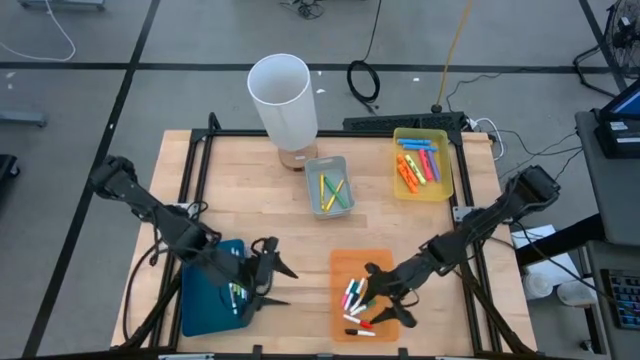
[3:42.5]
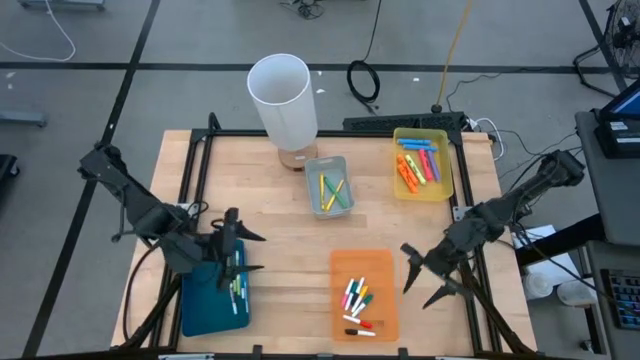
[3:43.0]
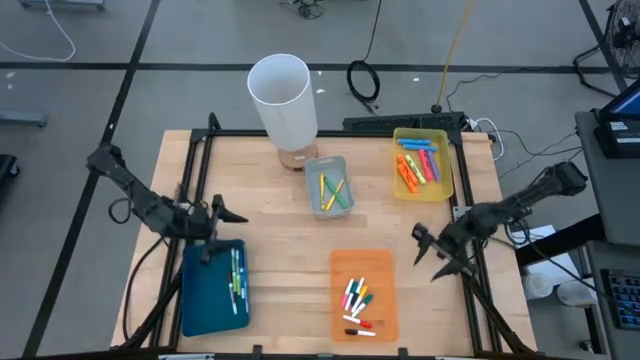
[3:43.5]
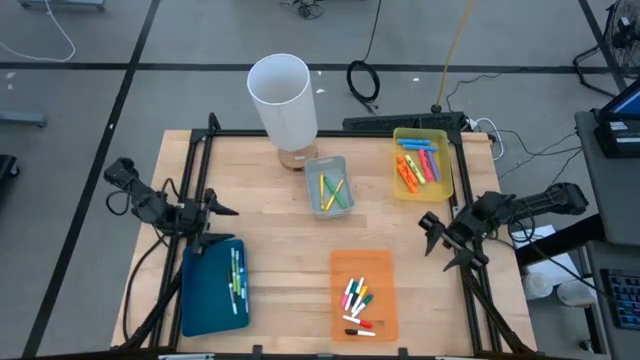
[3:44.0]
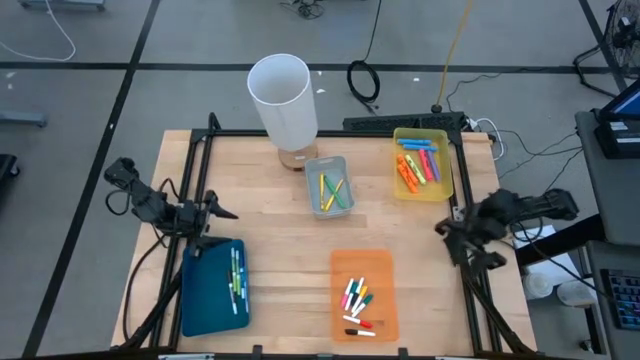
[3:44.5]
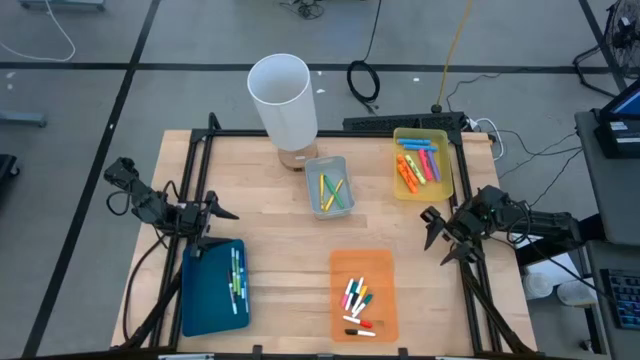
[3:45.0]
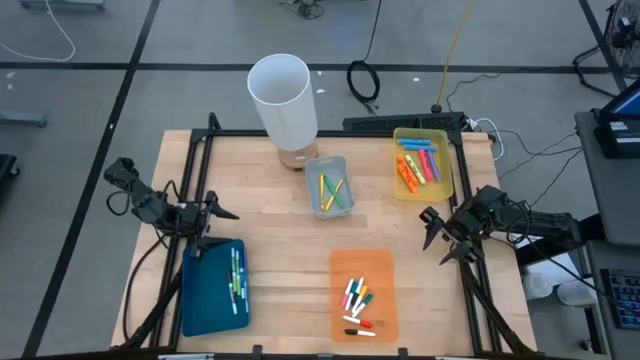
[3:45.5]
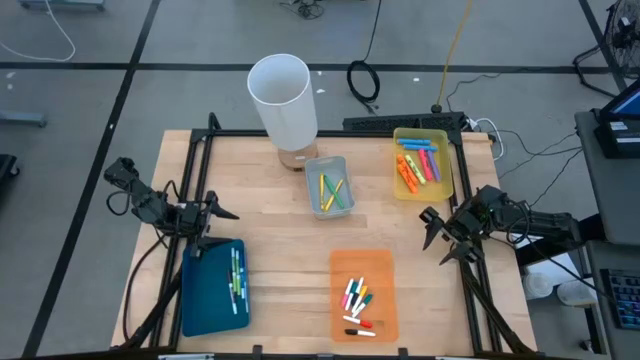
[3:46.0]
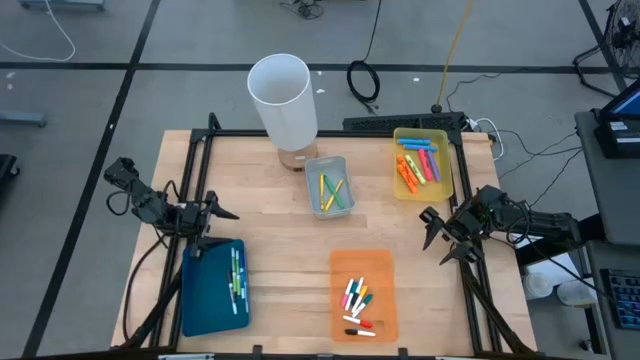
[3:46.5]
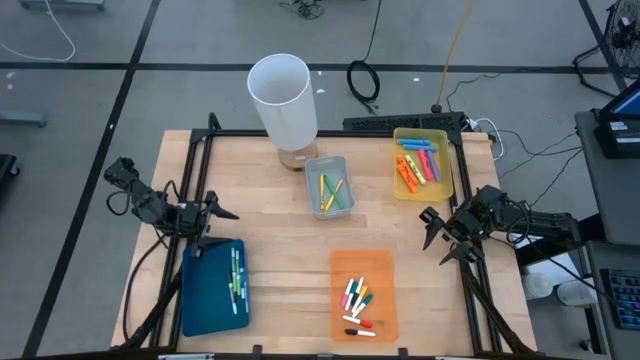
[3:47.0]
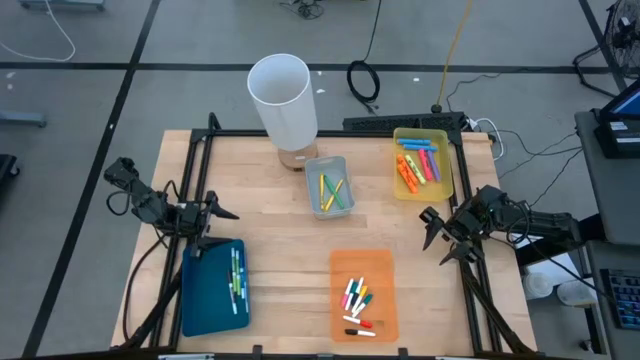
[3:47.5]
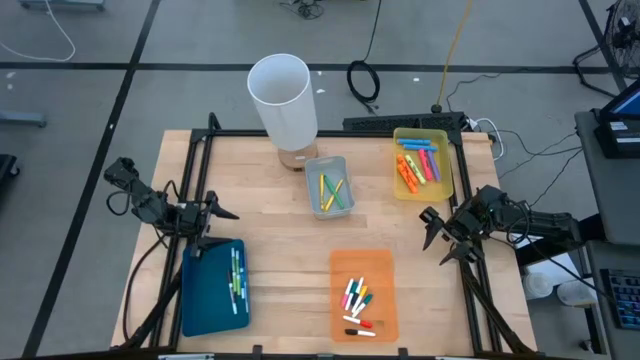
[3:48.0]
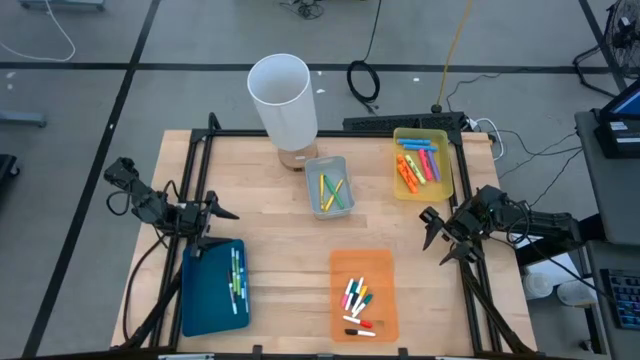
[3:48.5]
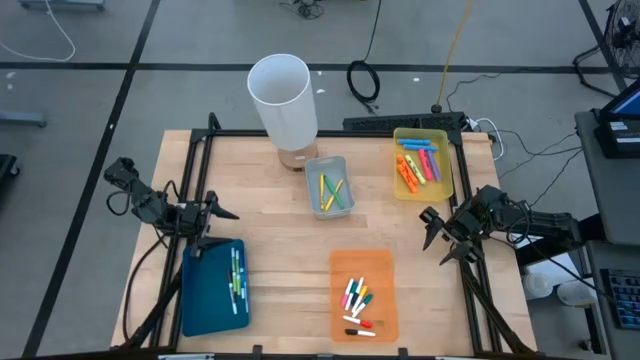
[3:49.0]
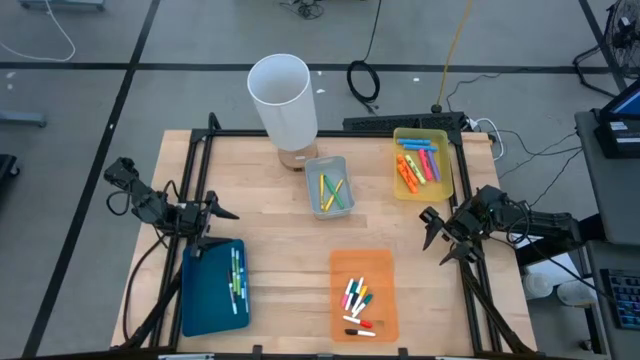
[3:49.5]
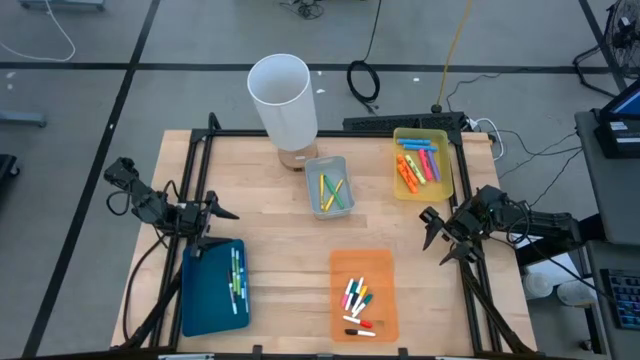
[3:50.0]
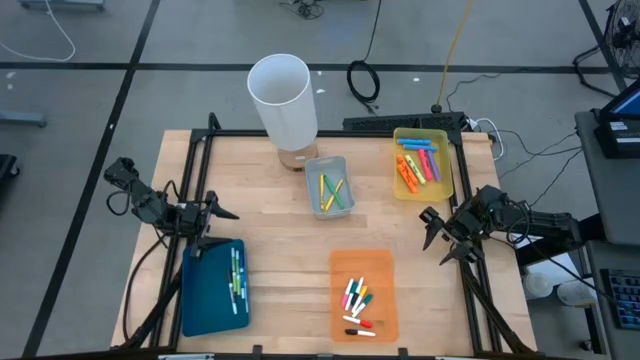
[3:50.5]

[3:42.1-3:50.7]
Task: Pick & Place Markers
Return to Home Position

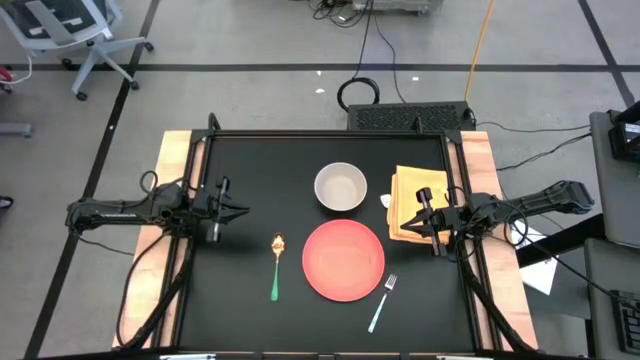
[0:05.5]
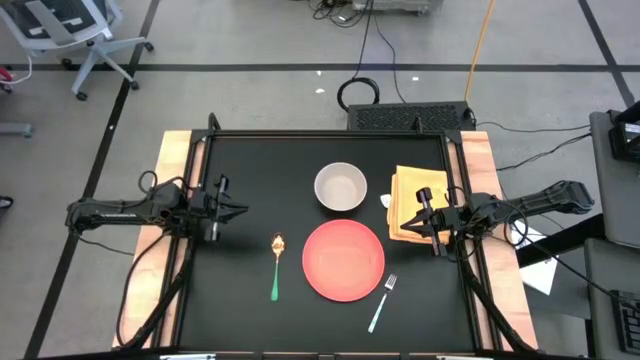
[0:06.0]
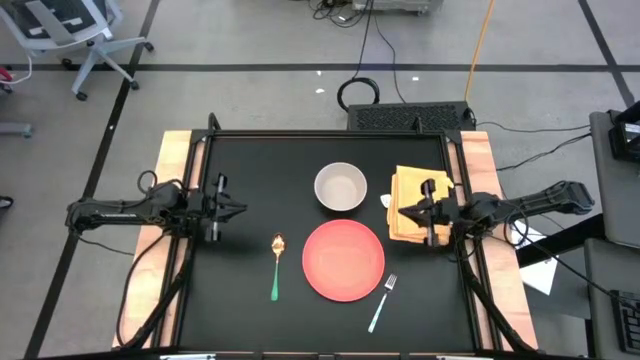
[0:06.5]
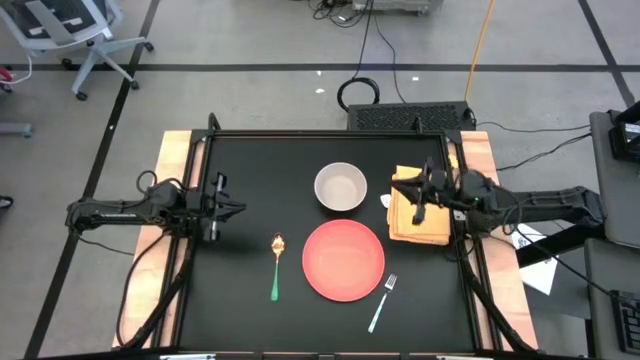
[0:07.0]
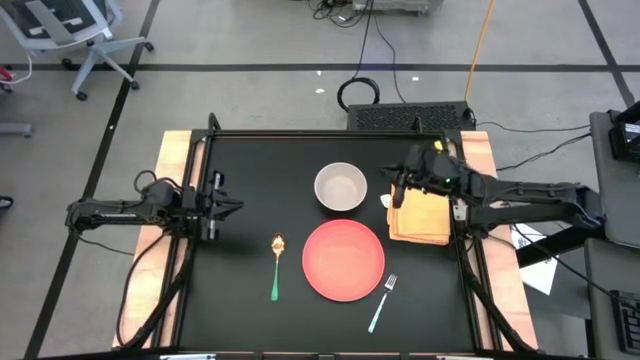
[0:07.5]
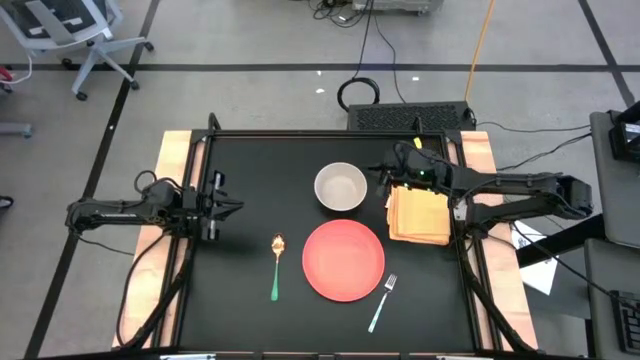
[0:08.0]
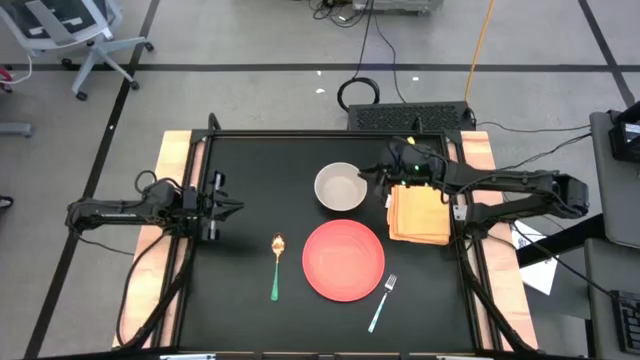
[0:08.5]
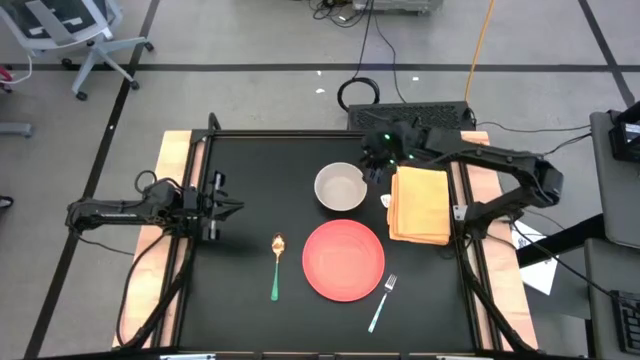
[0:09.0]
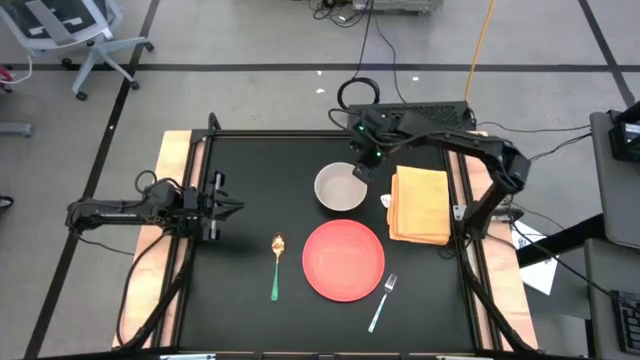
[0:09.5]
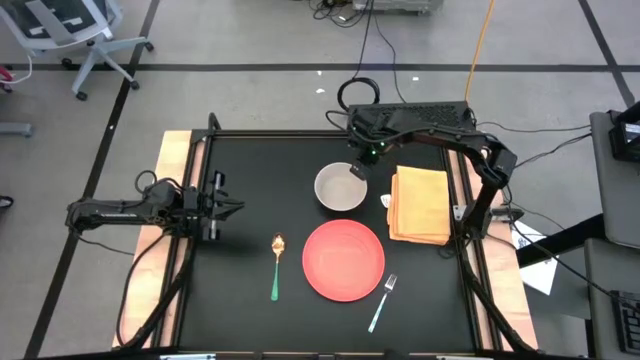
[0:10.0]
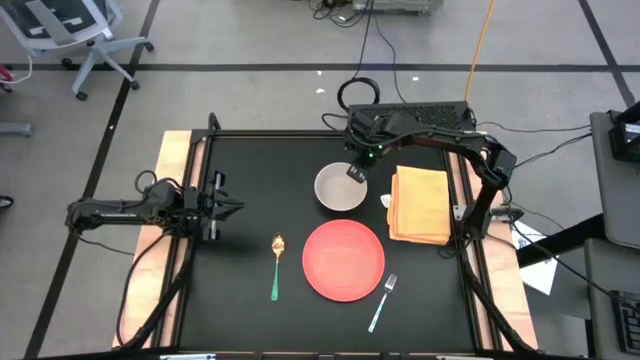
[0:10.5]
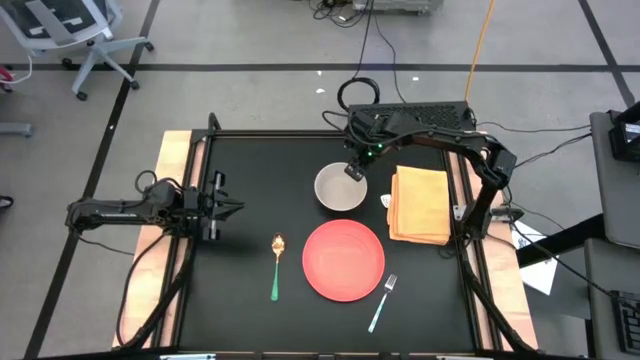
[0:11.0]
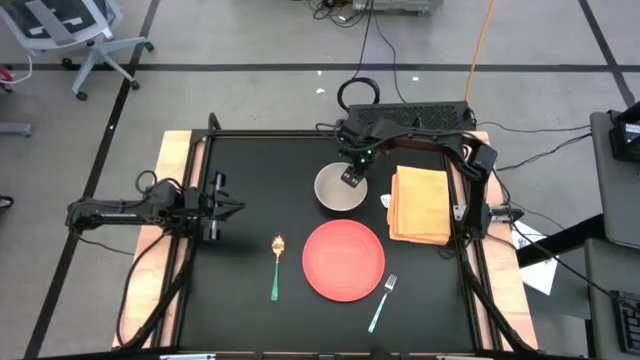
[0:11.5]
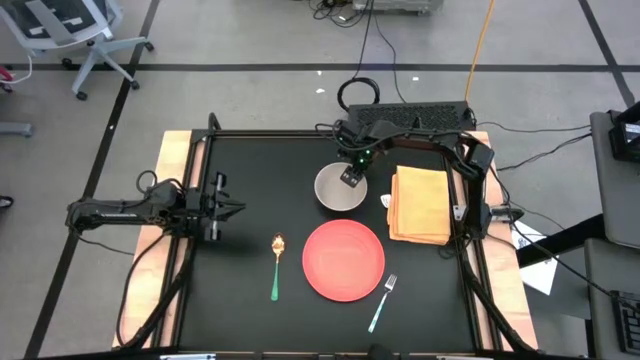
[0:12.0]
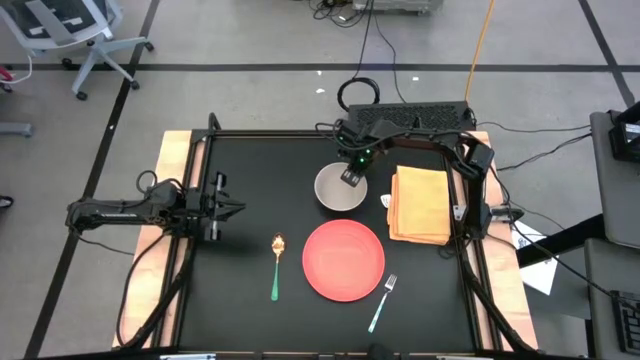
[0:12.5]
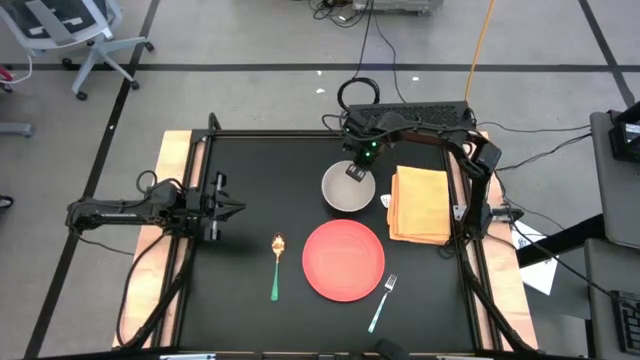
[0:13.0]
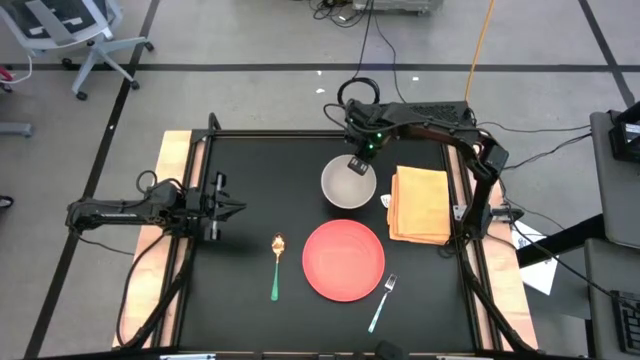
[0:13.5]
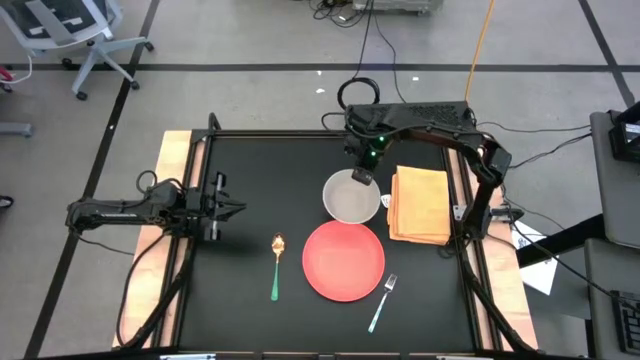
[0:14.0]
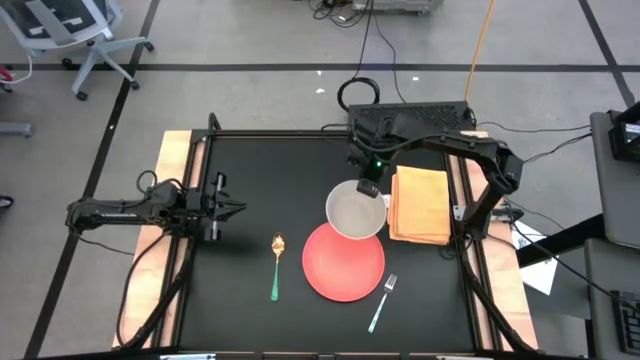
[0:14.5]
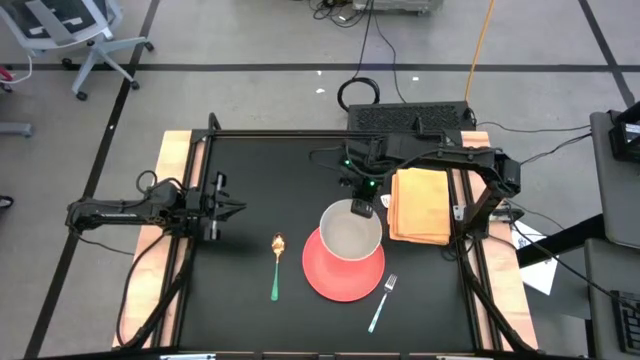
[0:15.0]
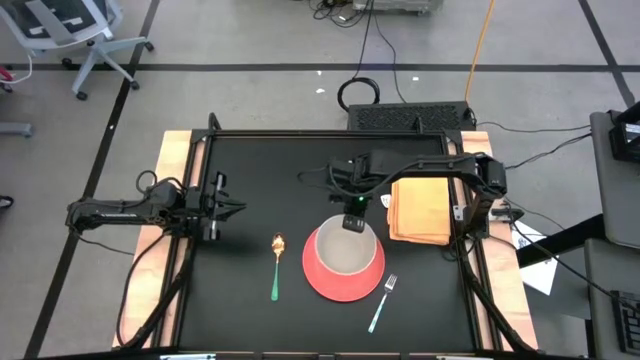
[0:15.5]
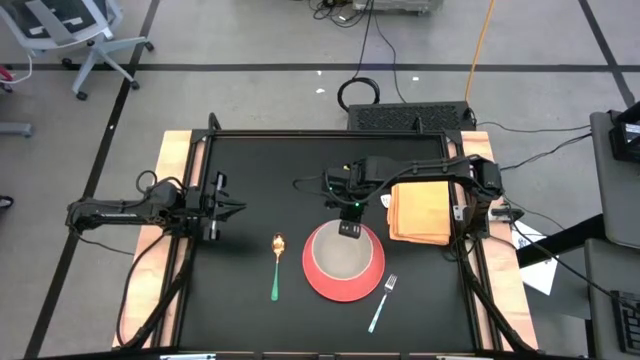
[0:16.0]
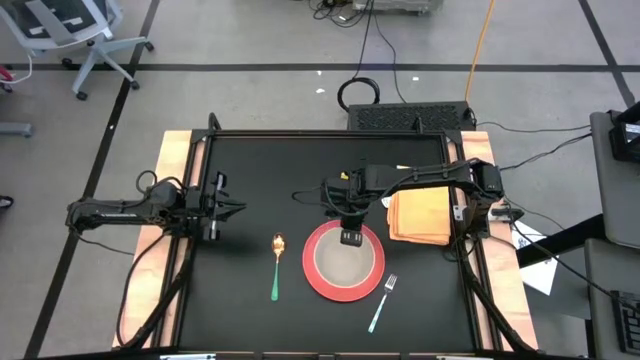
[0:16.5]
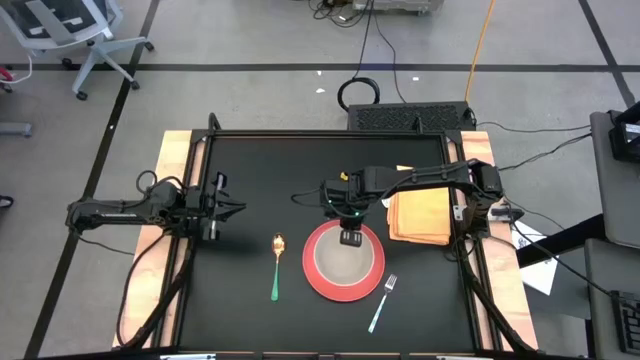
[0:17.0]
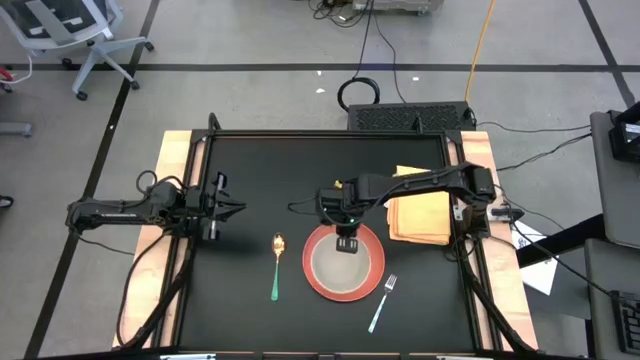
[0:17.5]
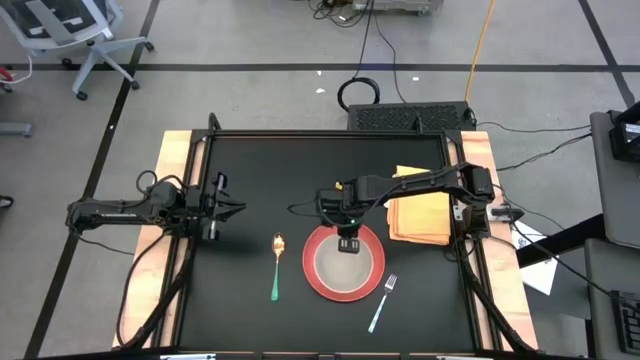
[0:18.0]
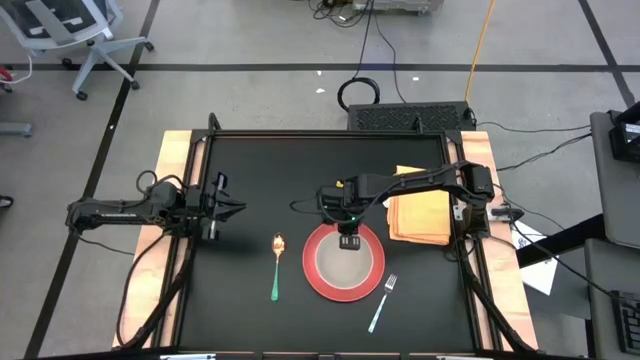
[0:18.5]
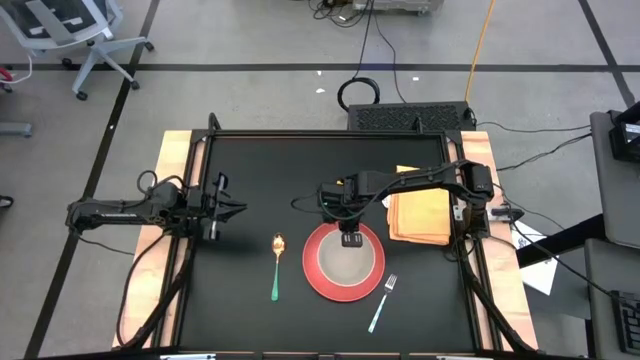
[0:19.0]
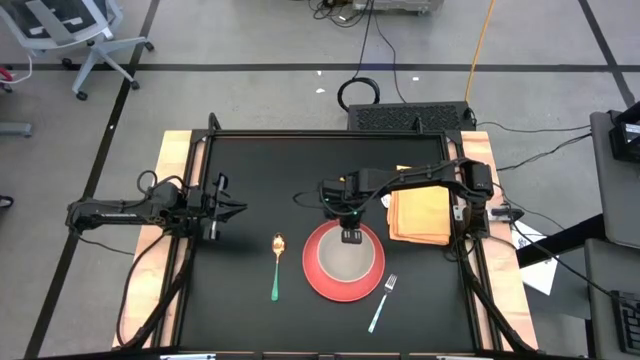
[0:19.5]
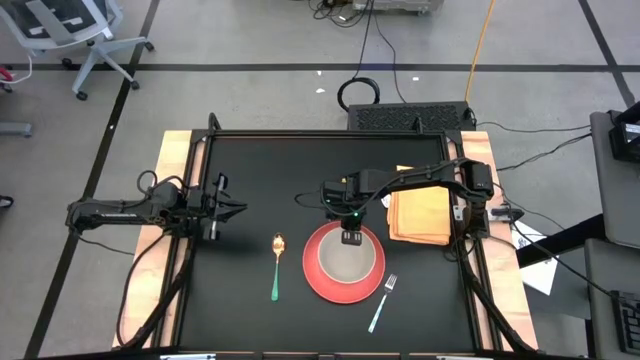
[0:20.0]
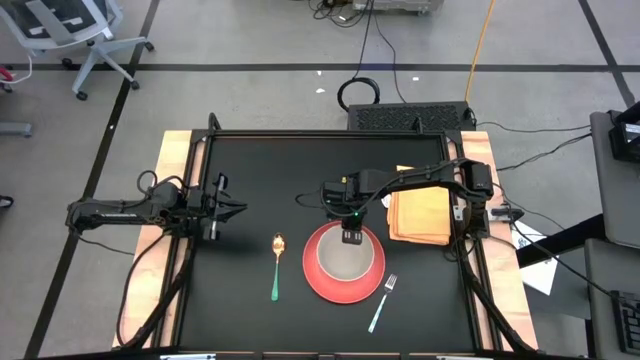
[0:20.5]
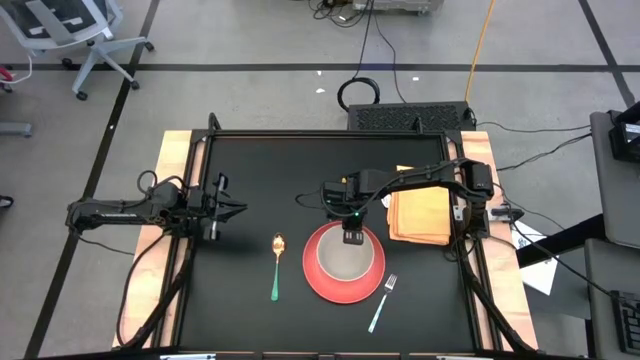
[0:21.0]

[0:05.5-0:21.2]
Task: Set table place
Put the white bowl on the orange plate
